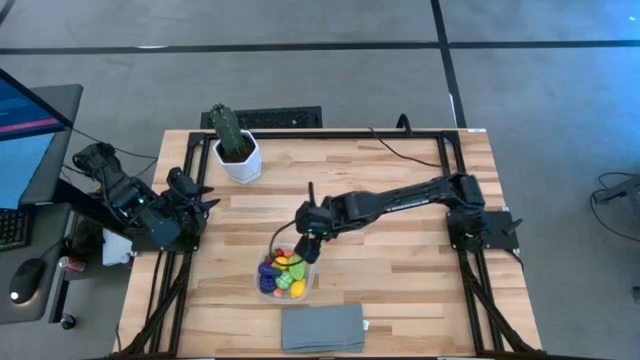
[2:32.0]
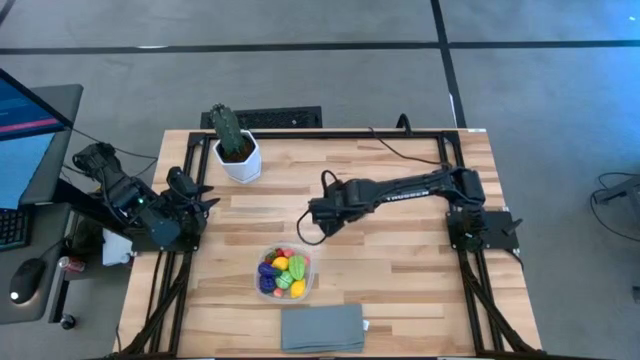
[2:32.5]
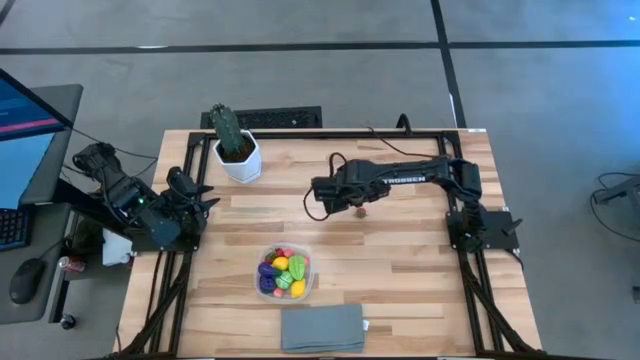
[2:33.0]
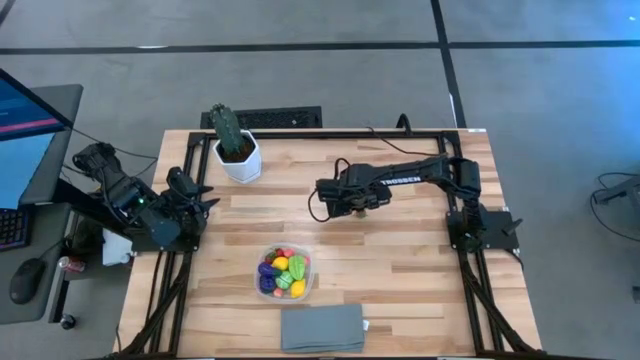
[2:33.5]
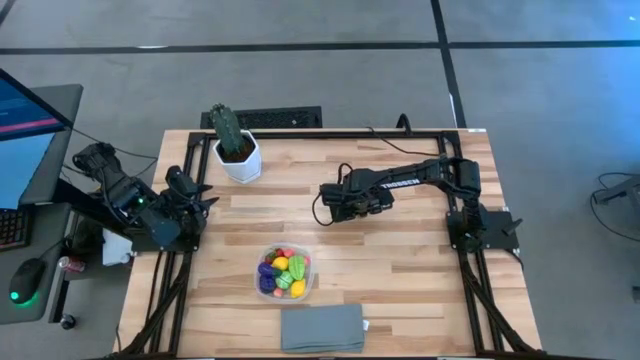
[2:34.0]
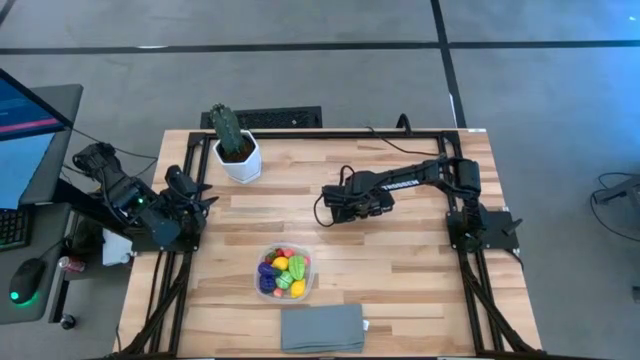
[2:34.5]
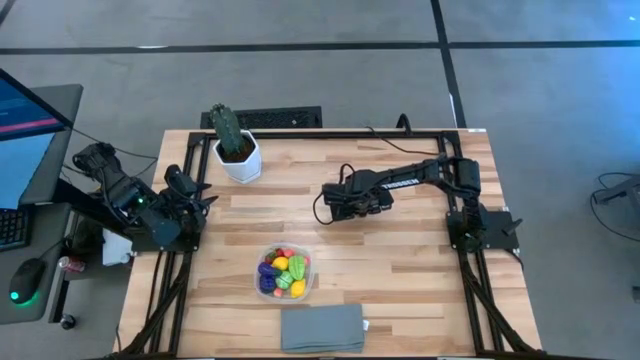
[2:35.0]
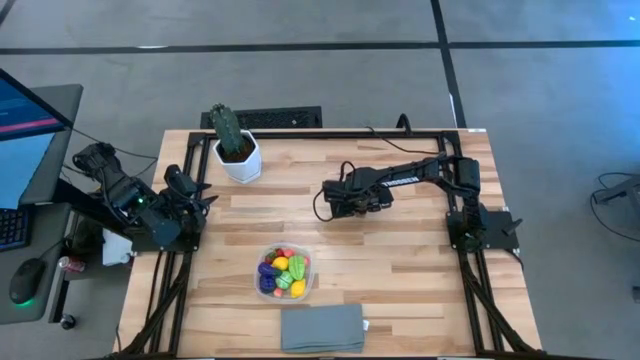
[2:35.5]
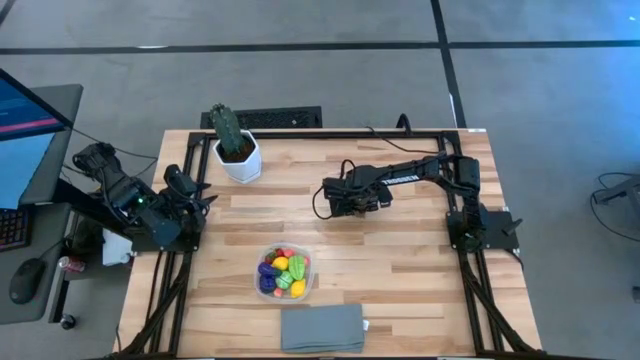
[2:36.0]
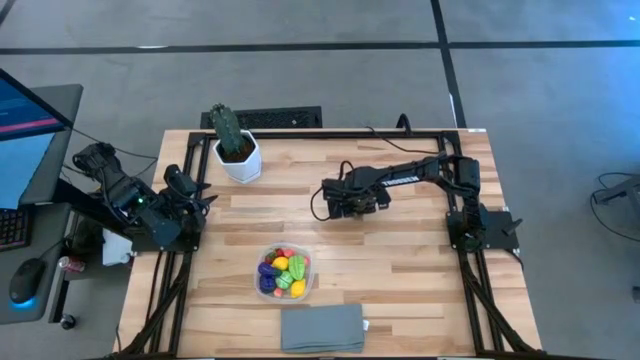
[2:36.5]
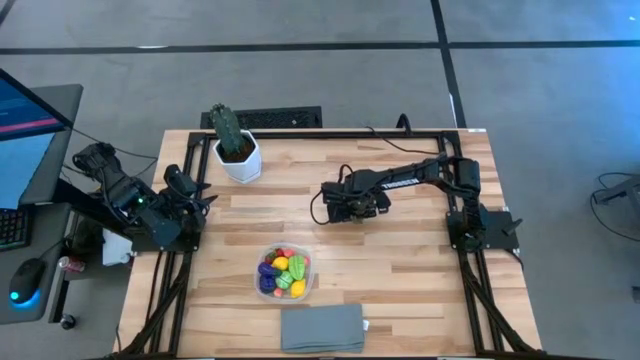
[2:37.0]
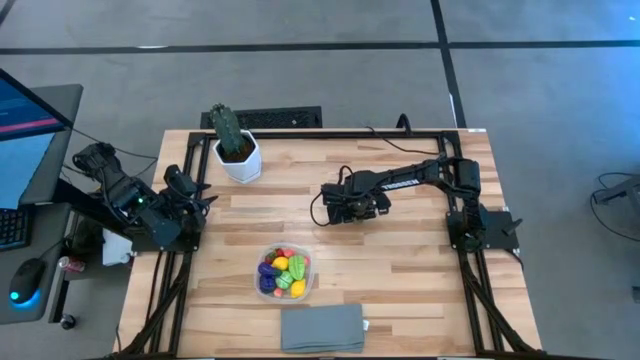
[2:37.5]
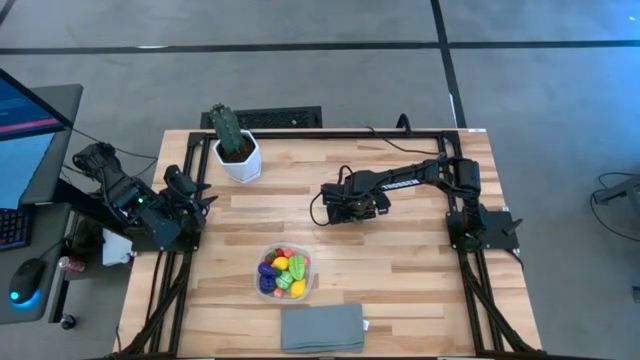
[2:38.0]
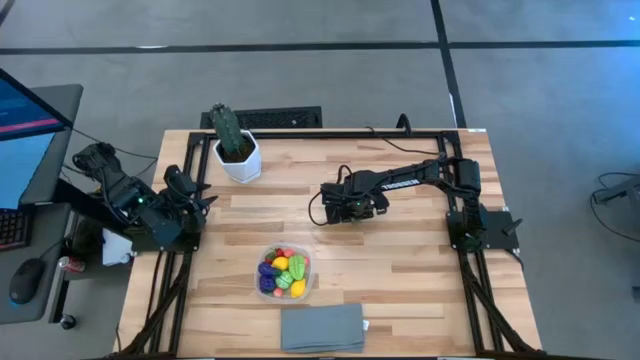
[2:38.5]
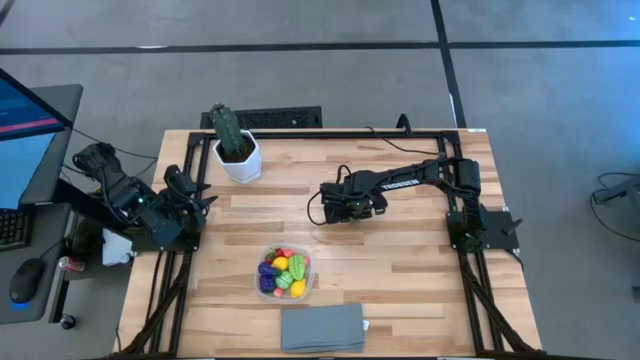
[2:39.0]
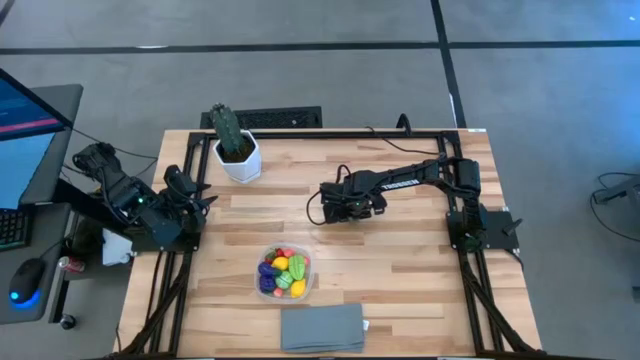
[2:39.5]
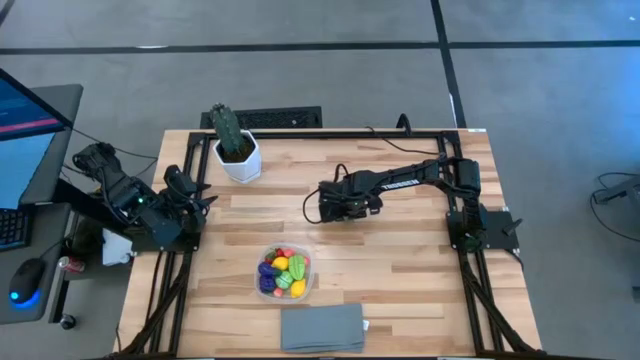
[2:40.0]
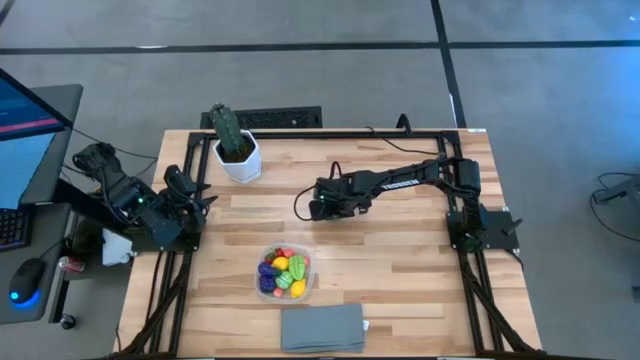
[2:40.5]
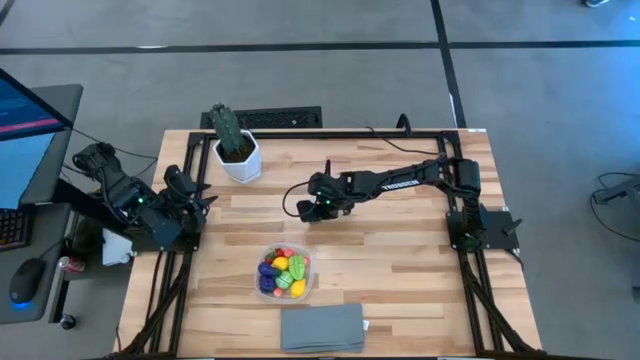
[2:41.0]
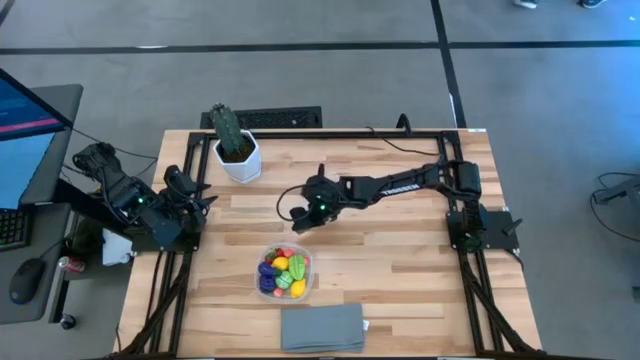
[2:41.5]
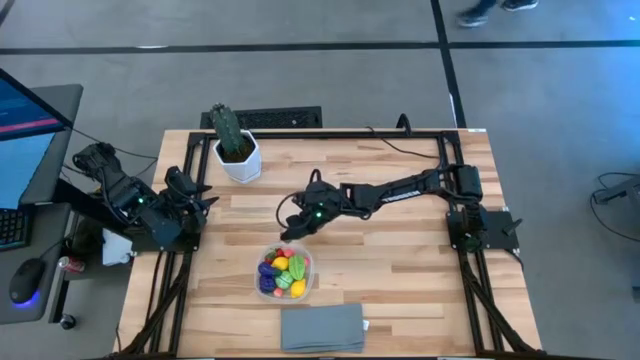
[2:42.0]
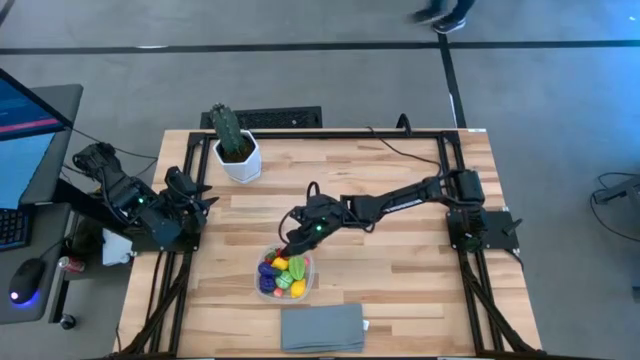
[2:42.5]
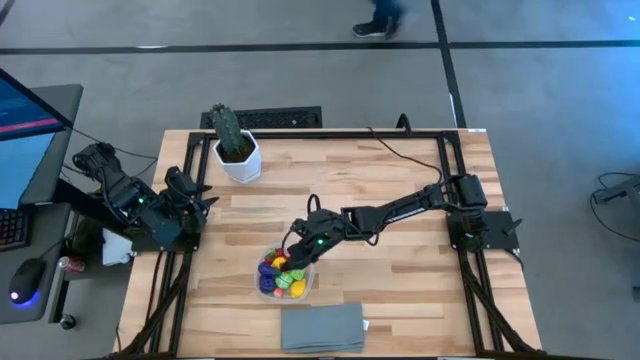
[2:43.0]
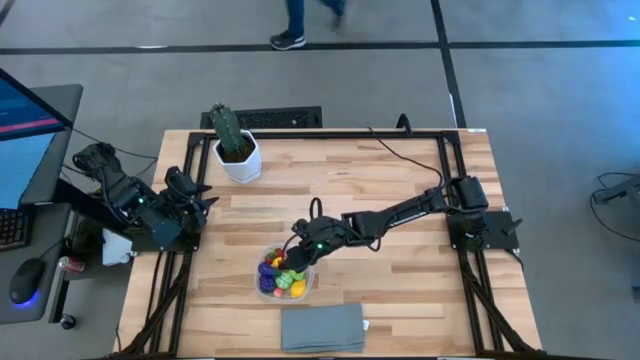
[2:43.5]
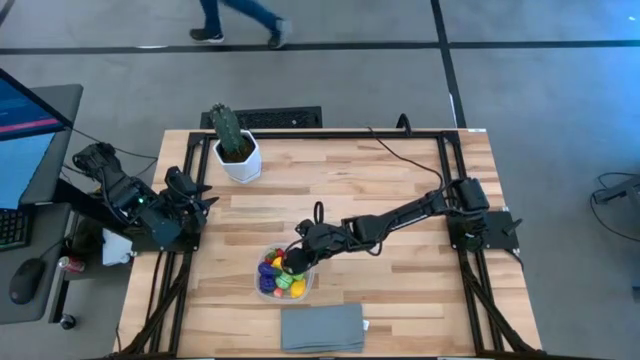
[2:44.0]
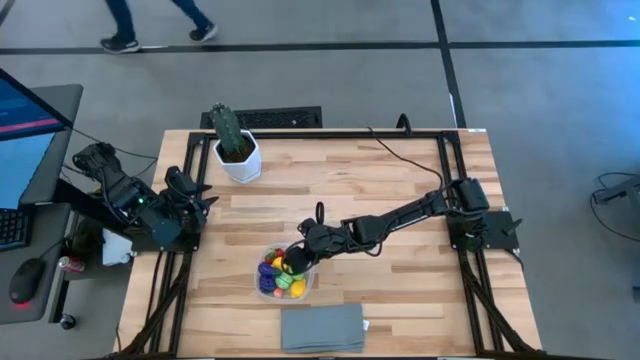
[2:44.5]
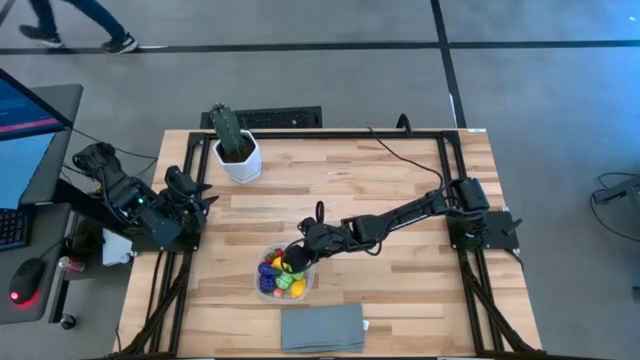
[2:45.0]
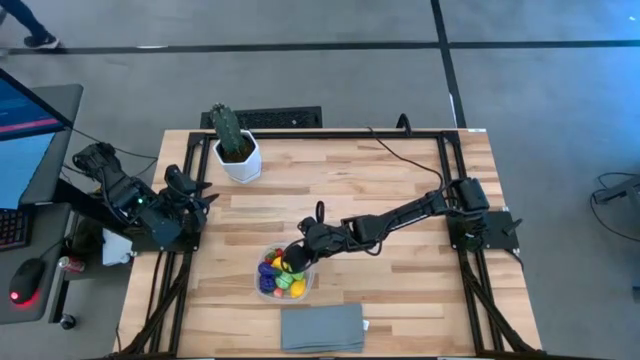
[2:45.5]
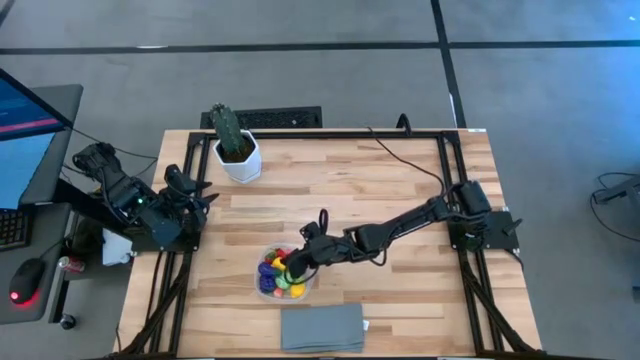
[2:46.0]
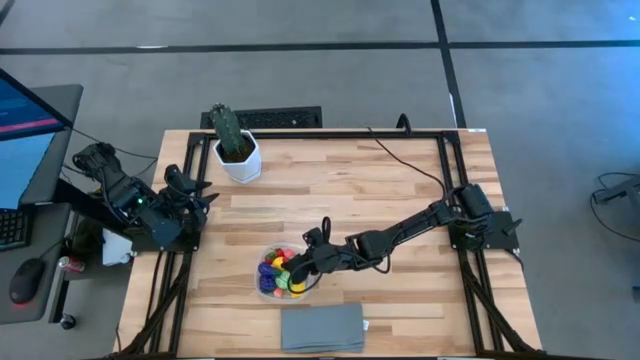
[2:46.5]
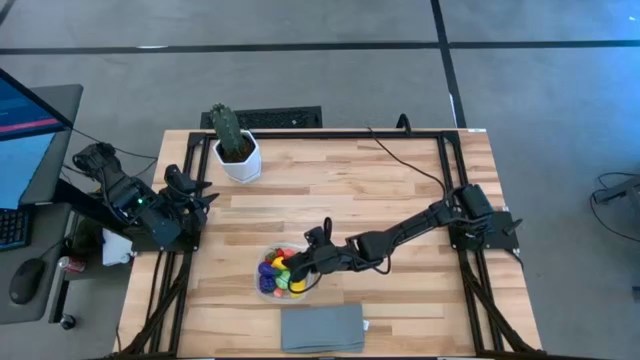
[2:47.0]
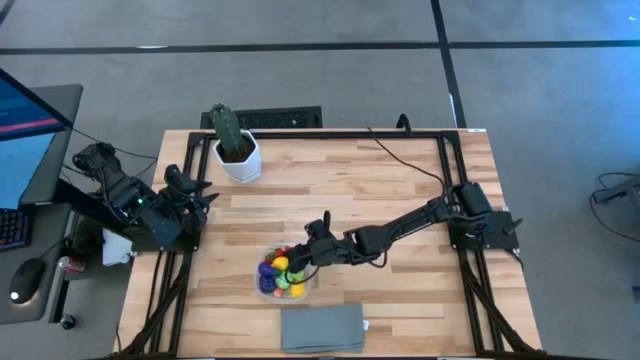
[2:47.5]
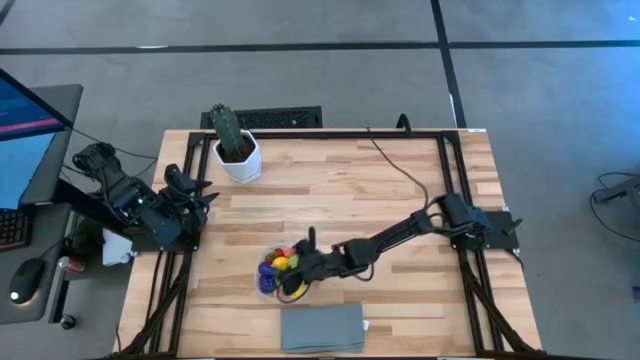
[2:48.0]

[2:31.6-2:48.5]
Task: Pick and placing Produce into tupperware
Put the strawberry into the transparent bin

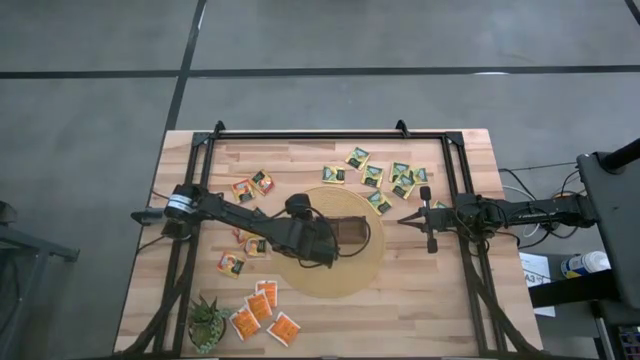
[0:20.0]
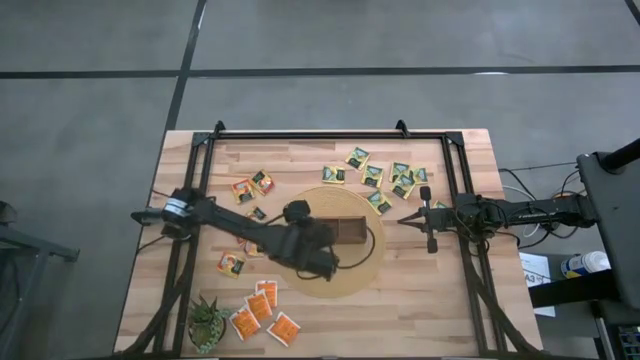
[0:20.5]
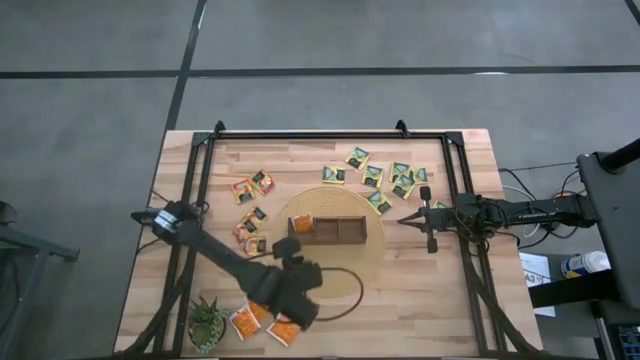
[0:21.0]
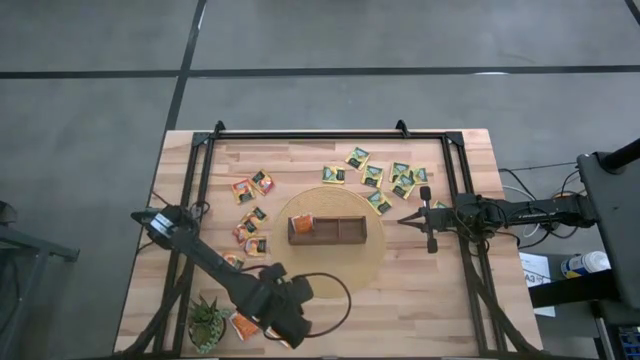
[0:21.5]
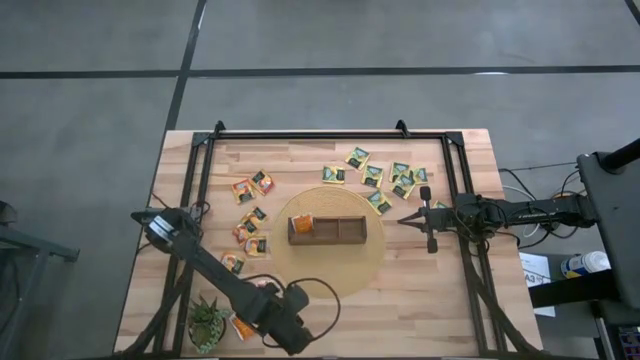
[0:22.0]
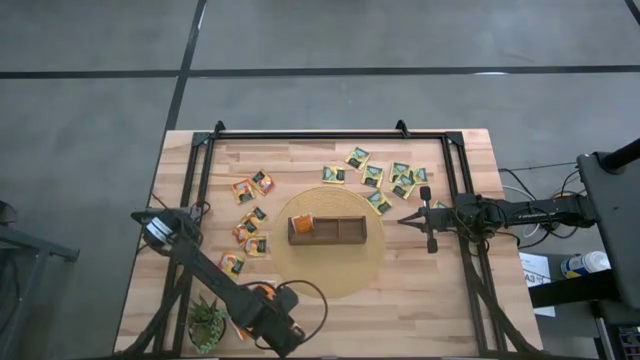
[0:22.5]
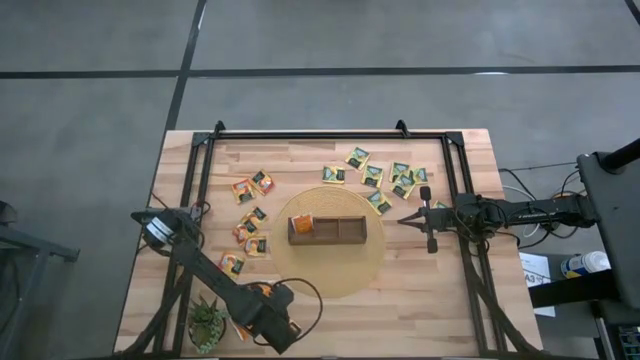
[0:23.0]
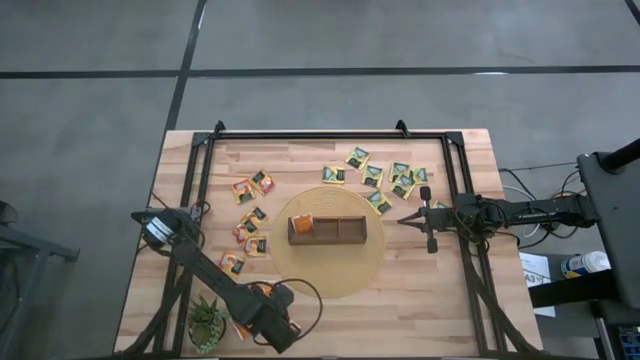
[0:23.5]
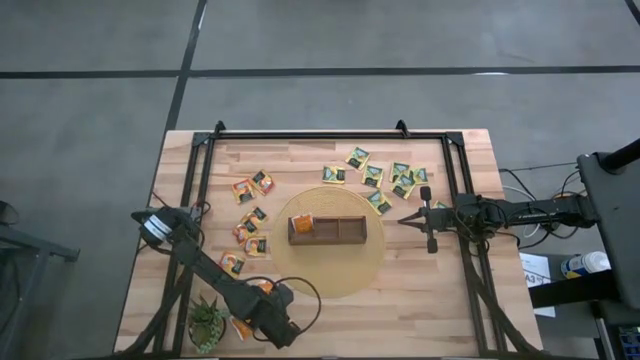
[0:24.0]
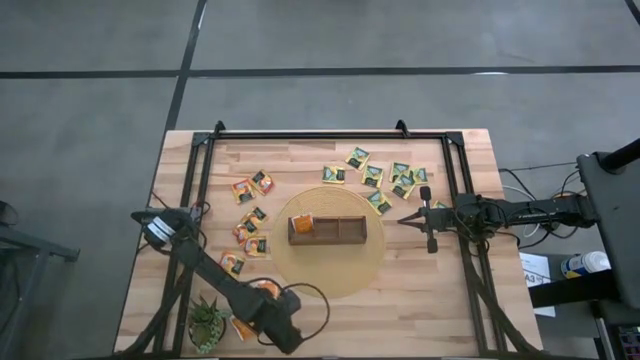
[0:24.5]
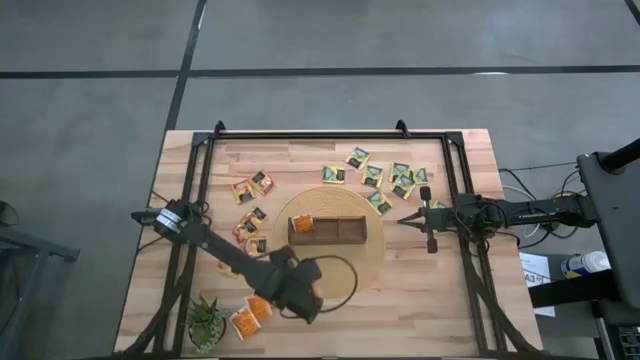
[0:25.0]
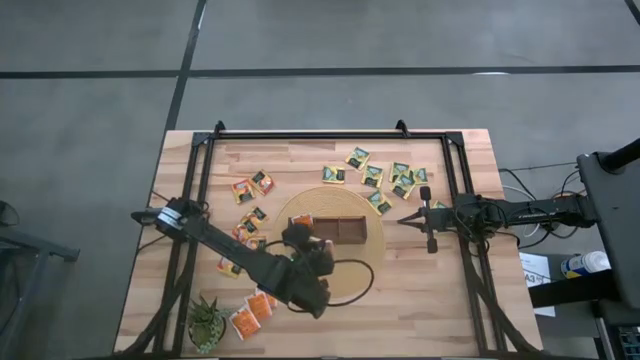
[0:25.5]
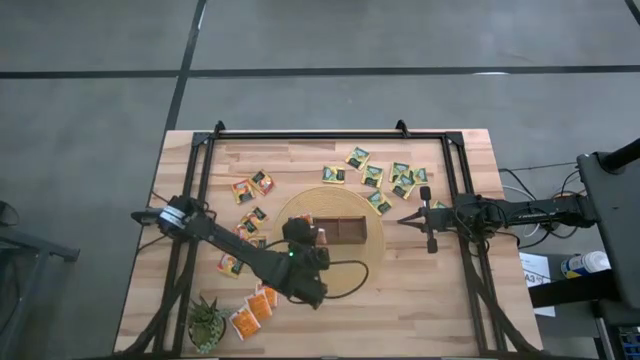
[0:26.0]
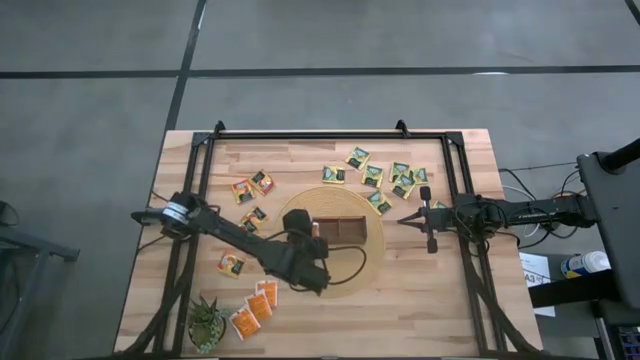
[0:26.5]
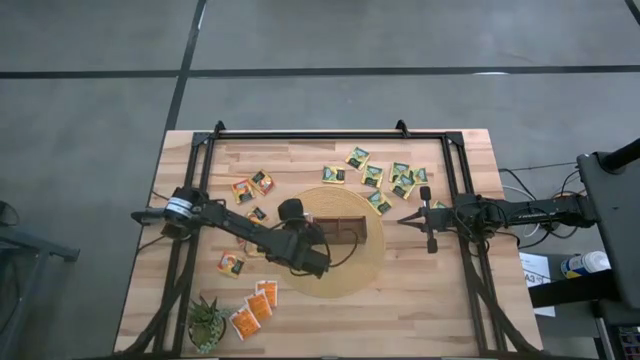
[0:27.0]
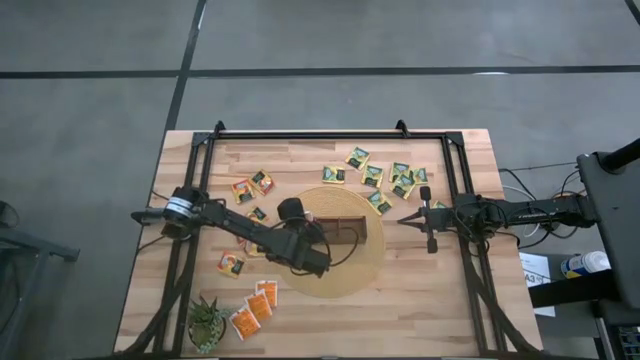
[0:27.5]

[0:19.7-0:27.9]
Task: Pick & Place Tea
Put the white orange tea bag into the left section of the wooden organizer
